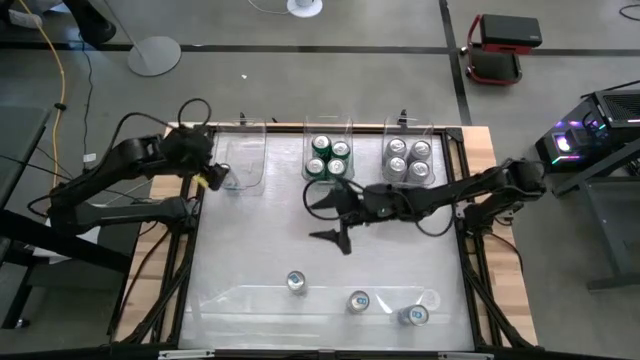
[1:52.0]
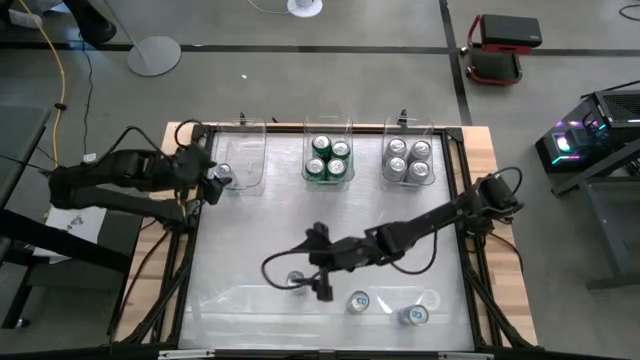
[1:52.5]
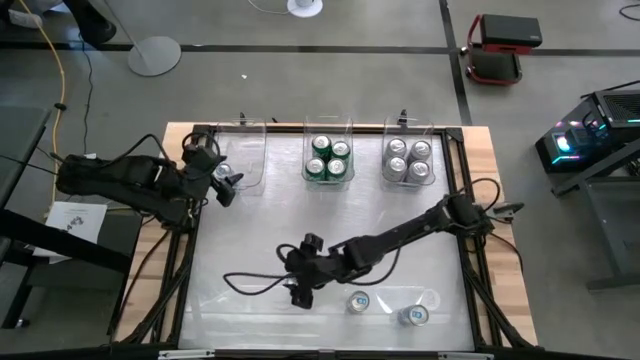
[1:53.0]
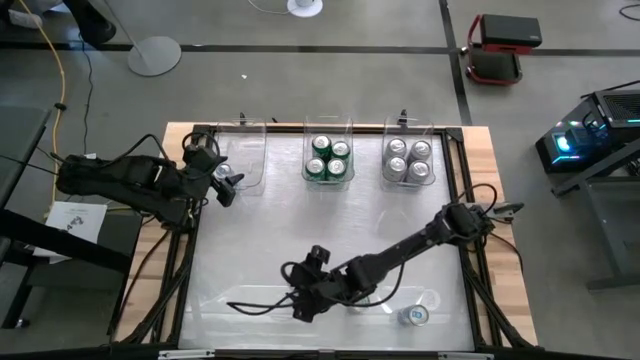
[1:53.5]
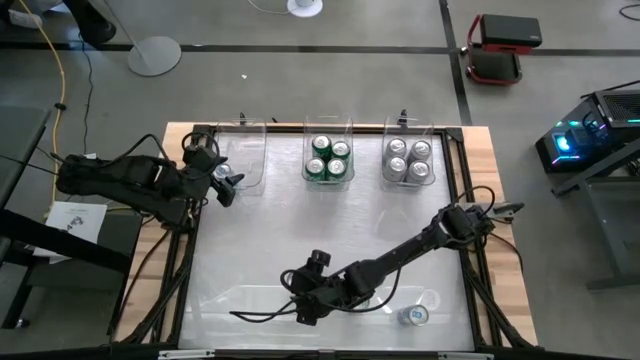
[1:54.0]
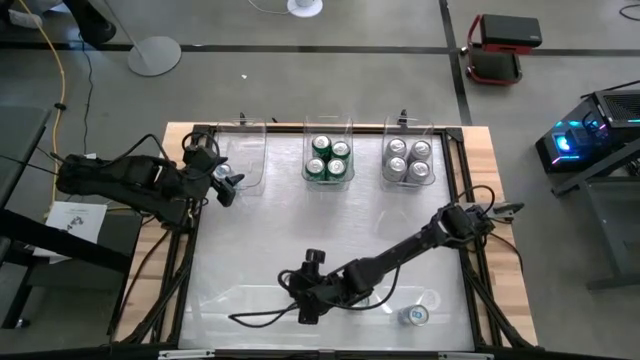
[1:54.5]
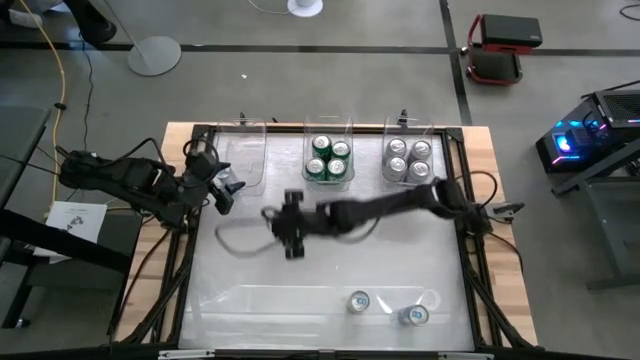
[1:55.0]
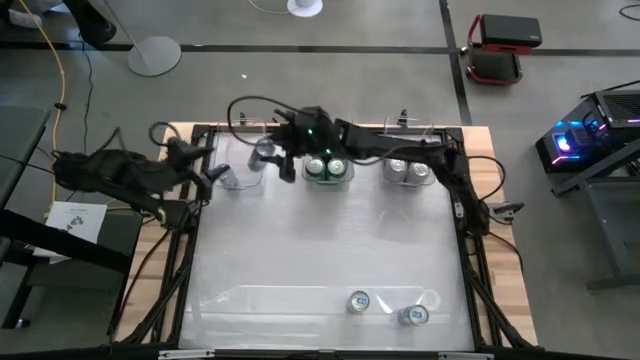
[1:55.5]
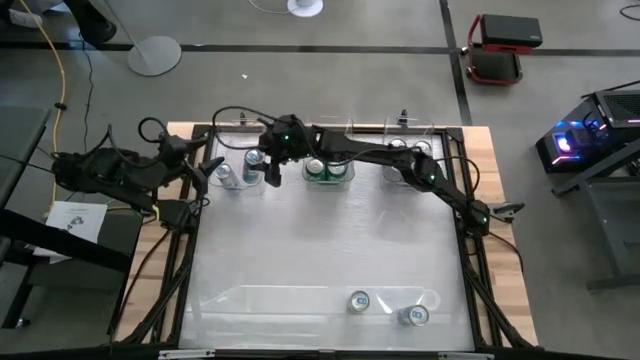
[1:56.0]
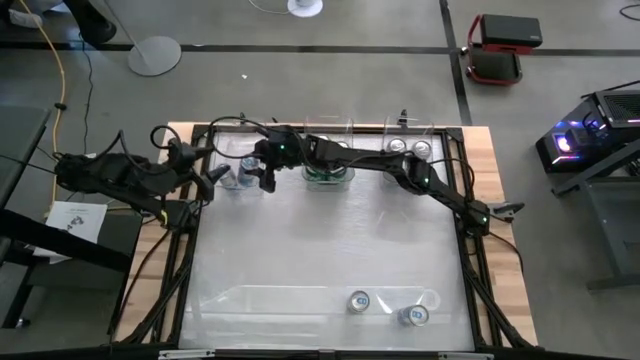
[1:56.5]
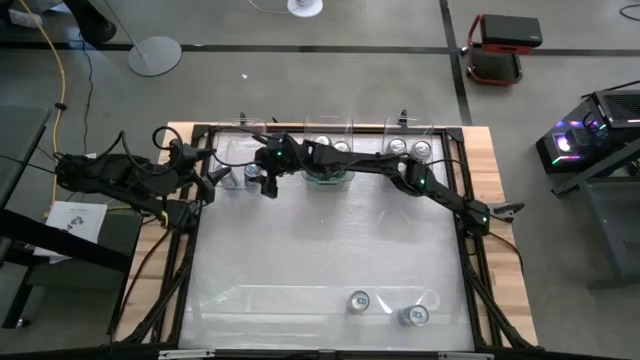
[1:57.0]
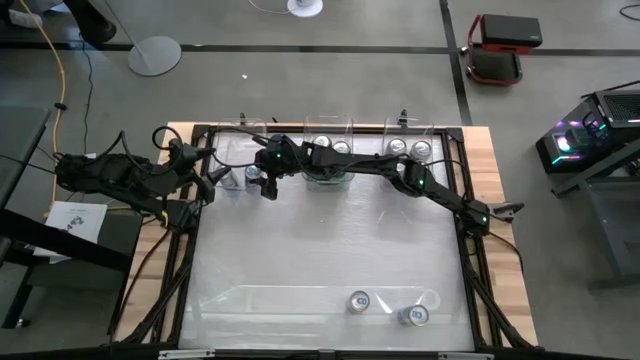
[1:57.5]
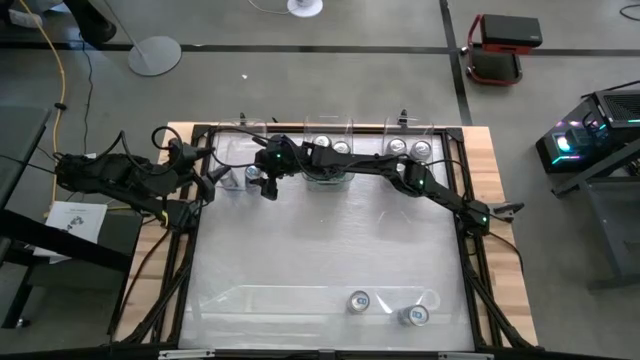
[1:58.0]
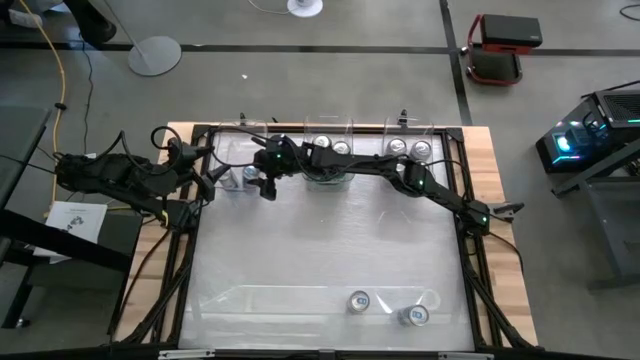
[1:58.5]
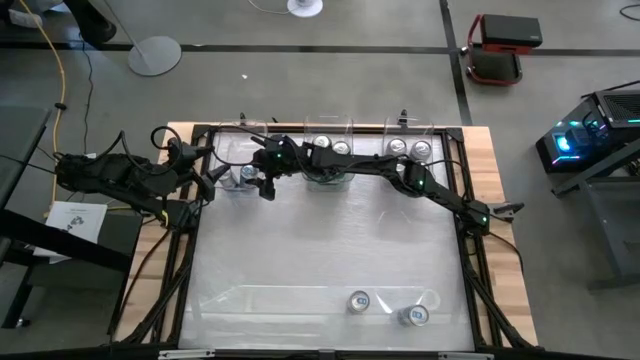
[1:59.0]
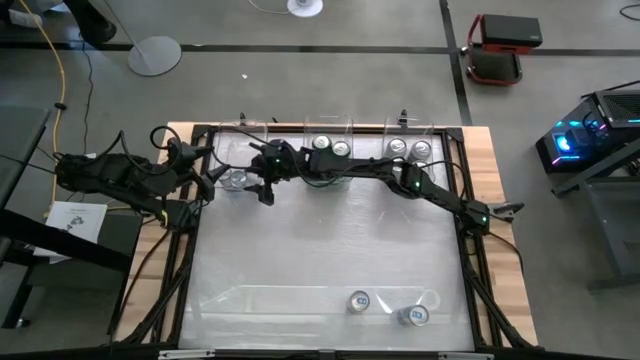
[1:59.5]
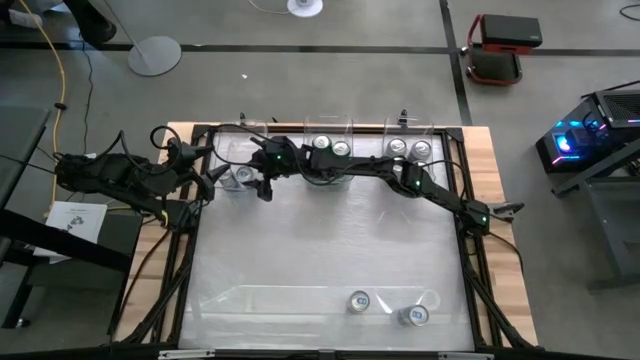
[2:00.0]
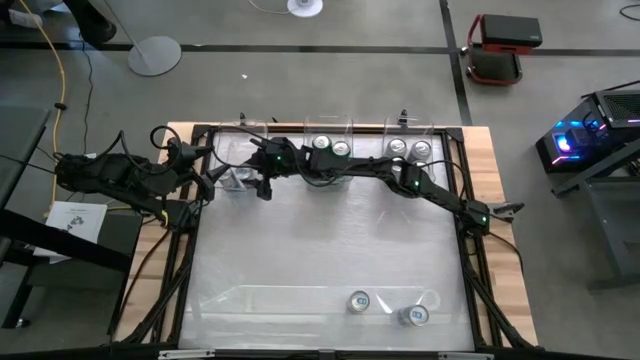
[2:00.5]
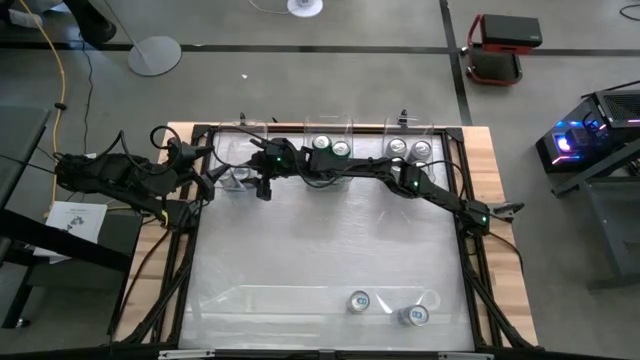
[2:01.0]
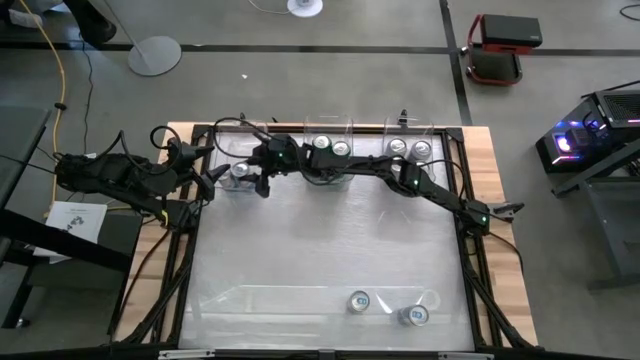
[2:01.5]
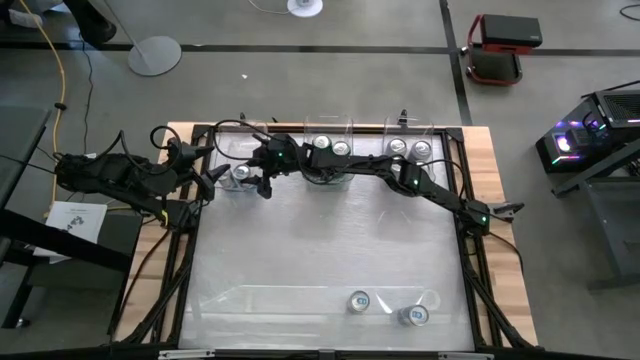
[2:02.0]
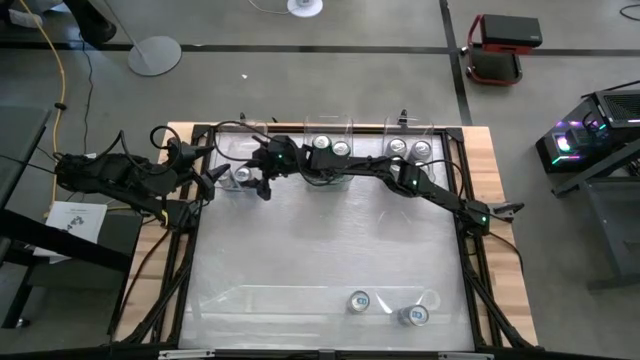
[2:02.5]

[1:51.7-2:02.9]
Task: Sort soda cans
Put the left blue can into the left transparent bin

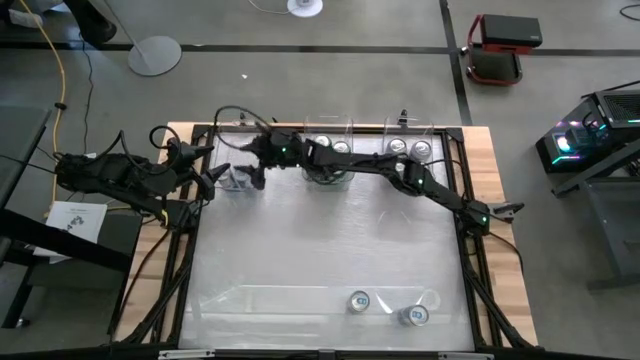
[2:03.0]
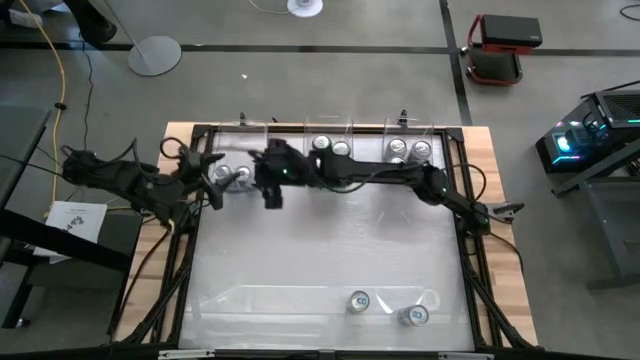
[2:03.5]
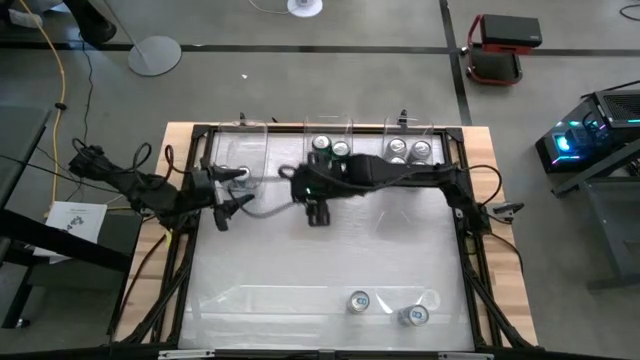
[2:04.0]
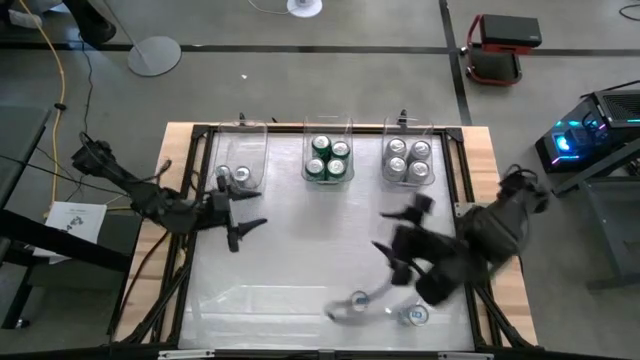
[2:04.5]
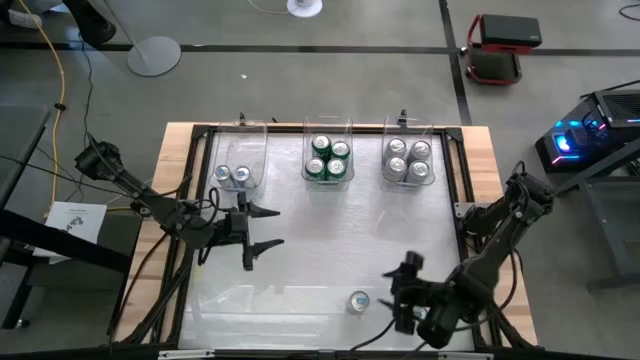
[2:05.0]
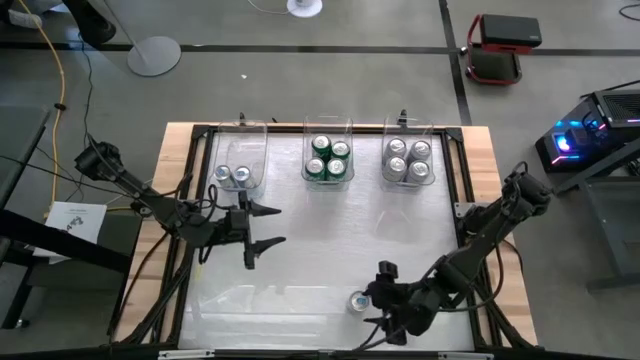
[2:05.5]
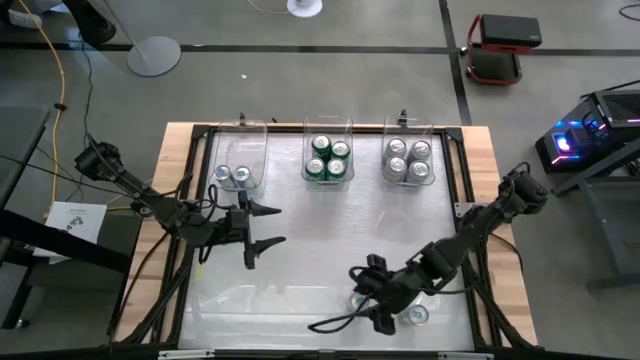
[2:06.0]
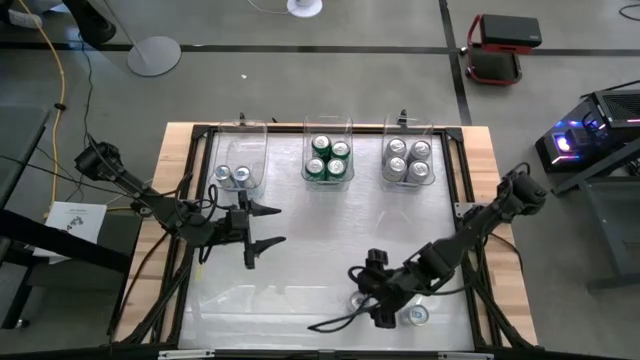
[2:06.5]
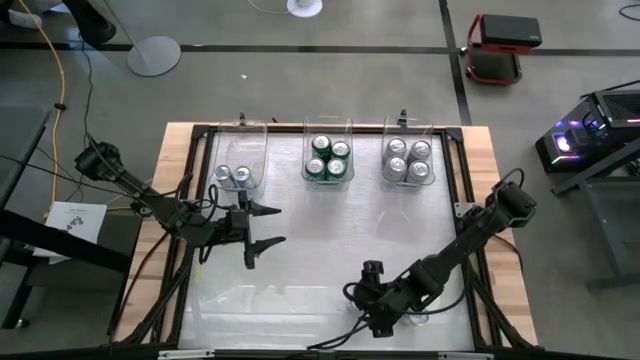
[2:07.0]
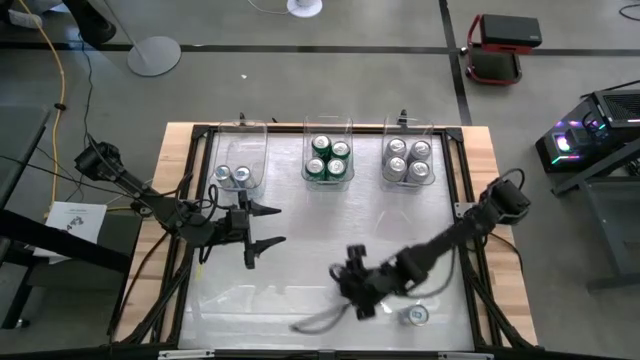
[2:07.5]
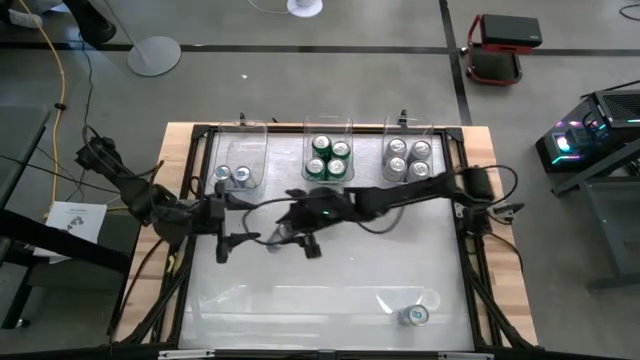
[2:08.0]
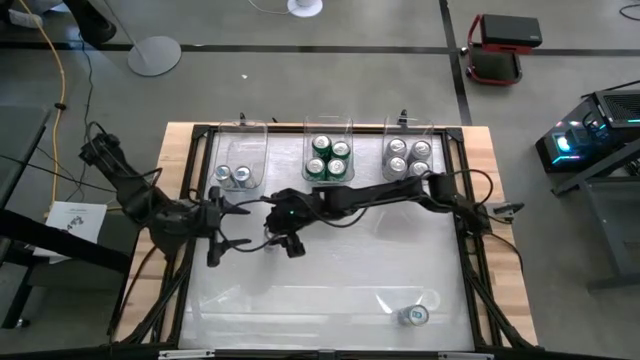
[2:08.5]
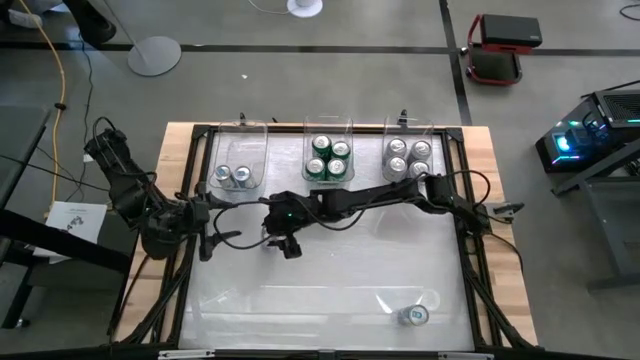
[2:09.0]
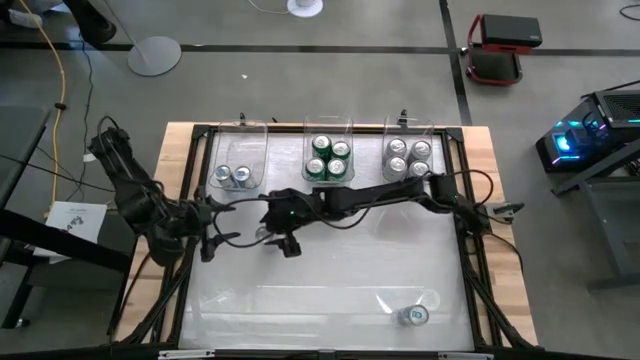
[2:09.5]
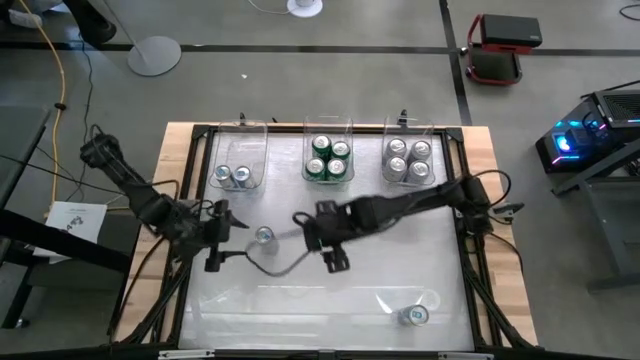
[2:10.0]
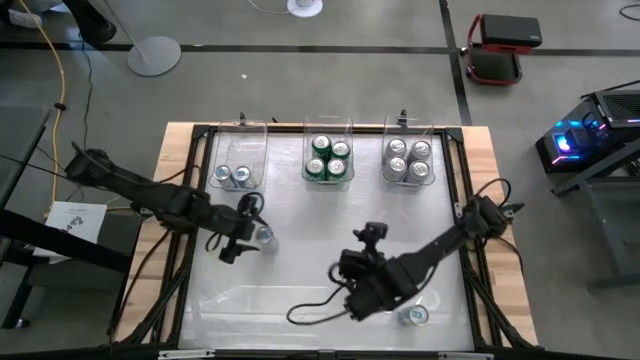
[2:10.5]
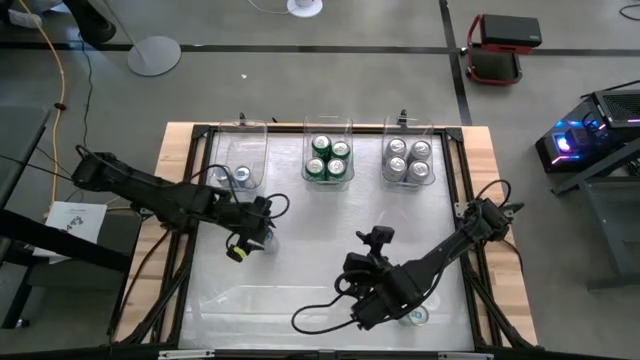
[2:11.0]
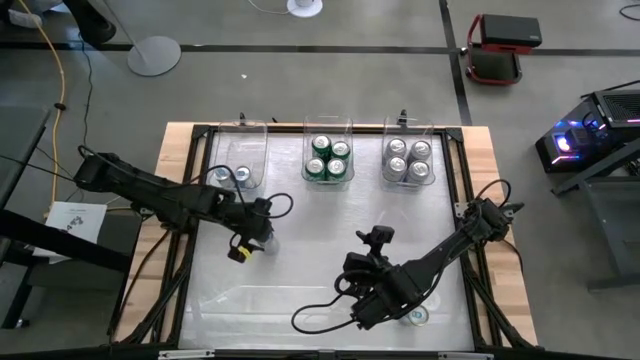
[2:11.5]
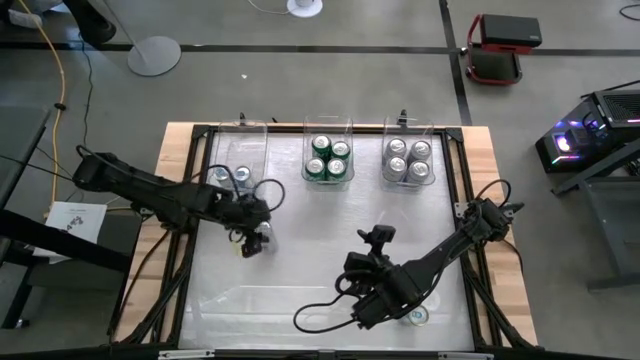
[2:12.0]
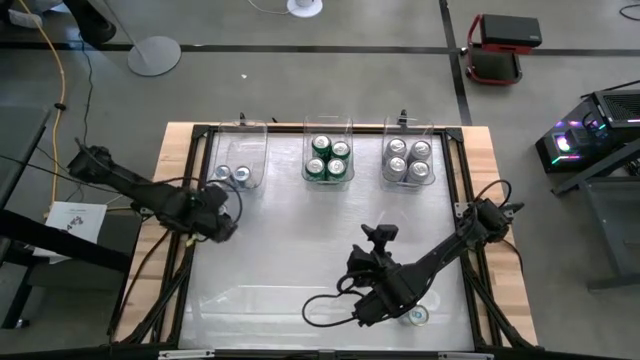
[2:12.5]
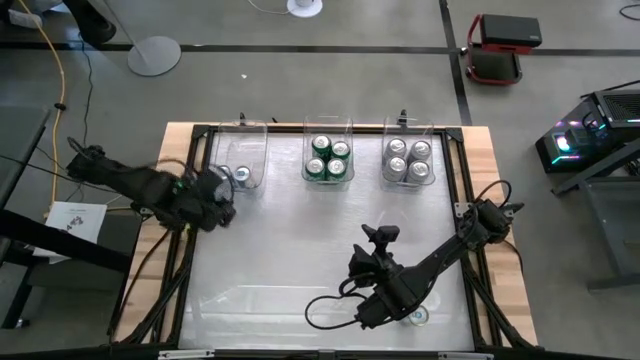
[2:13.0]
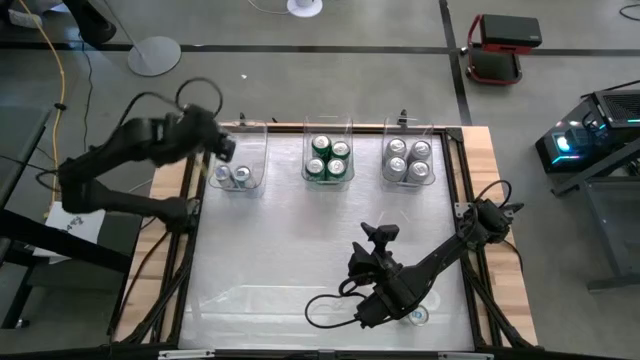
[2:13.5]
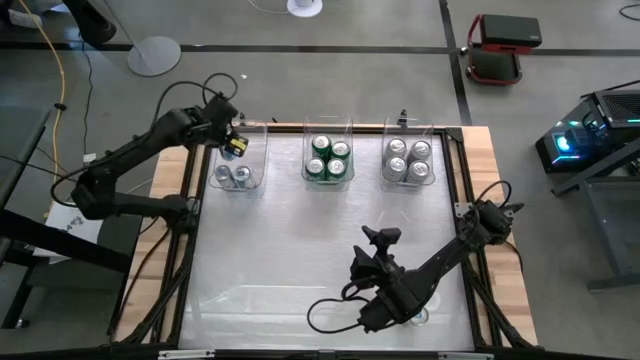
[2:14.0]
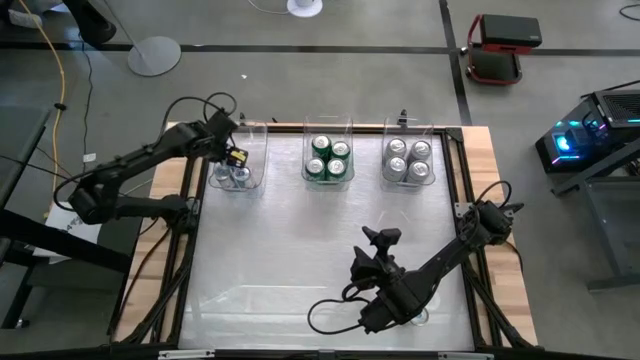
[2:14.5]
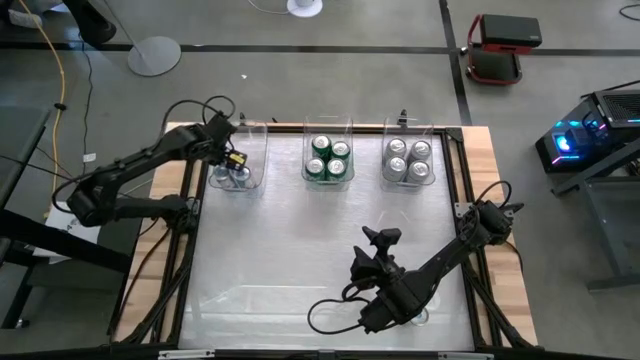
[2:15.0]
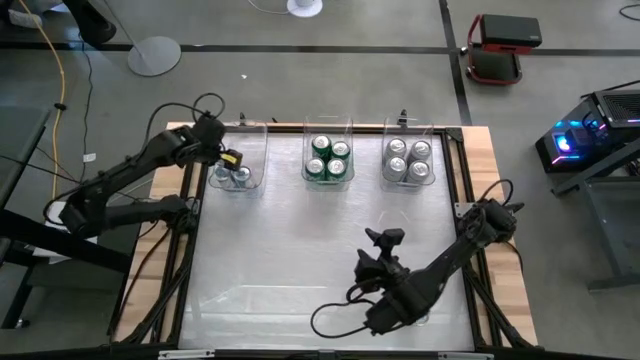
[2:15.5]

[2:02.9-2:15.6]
Put the left blue can into the left transparent bin
